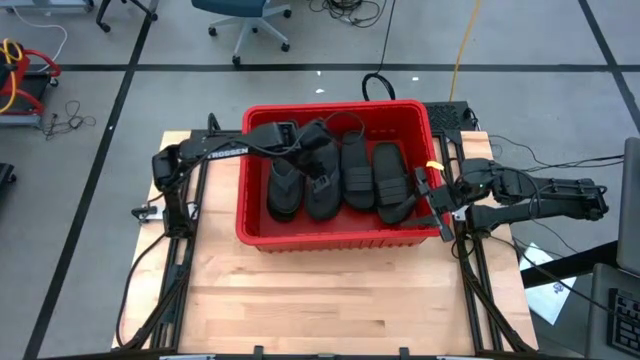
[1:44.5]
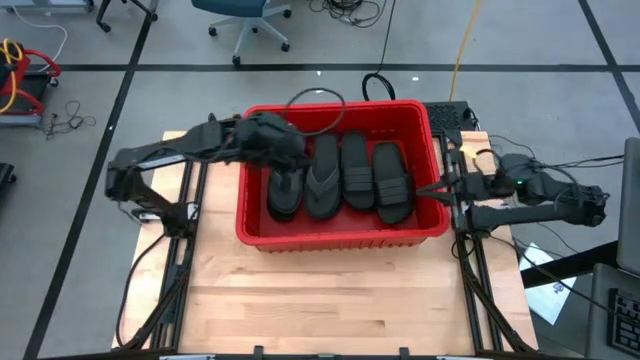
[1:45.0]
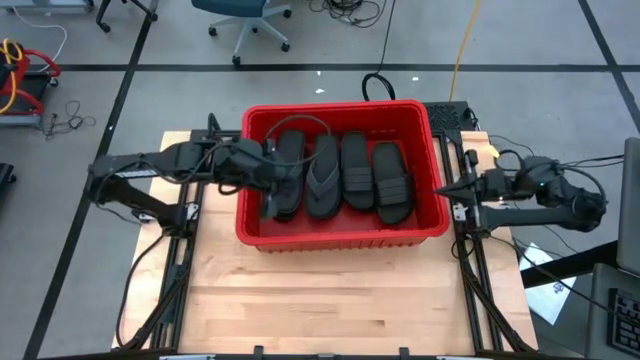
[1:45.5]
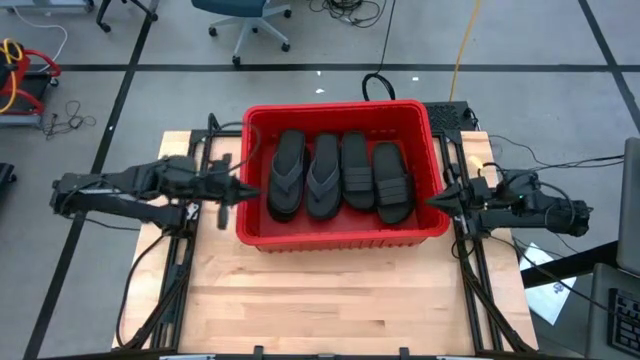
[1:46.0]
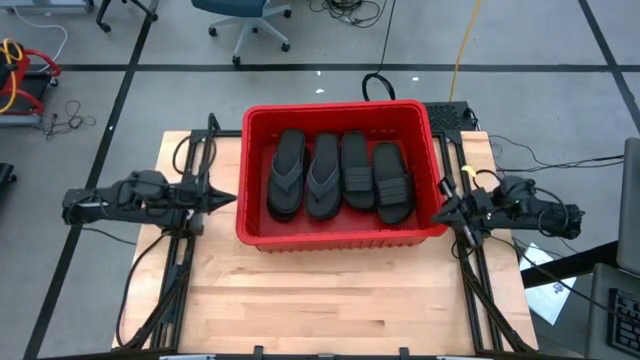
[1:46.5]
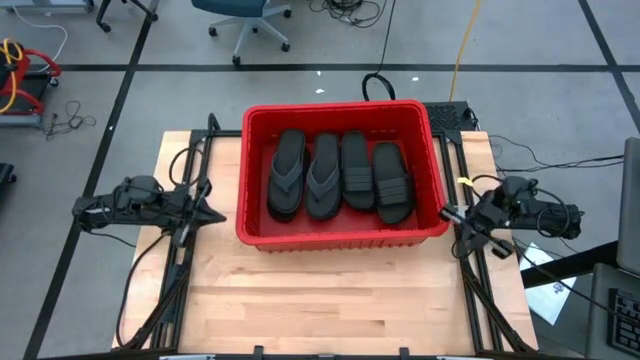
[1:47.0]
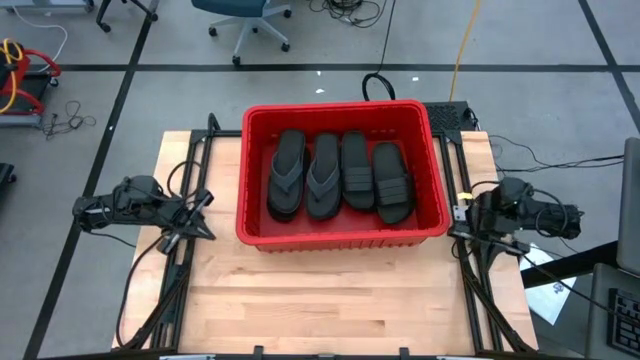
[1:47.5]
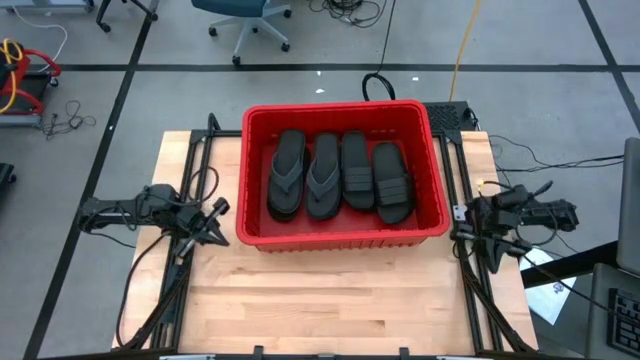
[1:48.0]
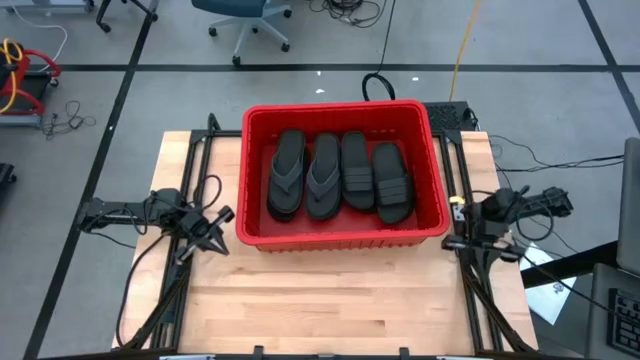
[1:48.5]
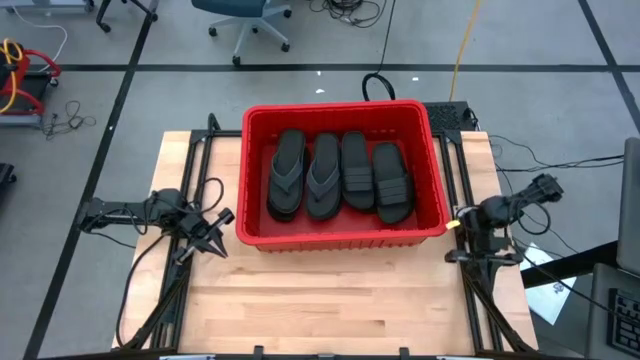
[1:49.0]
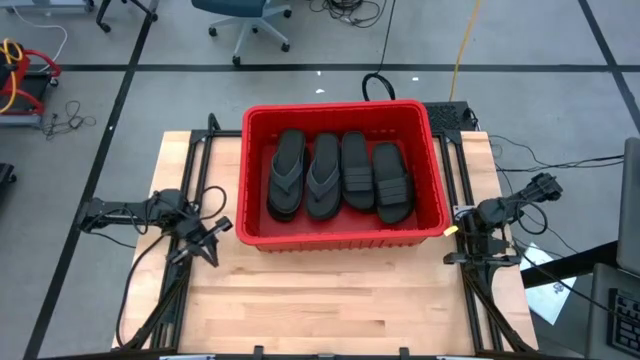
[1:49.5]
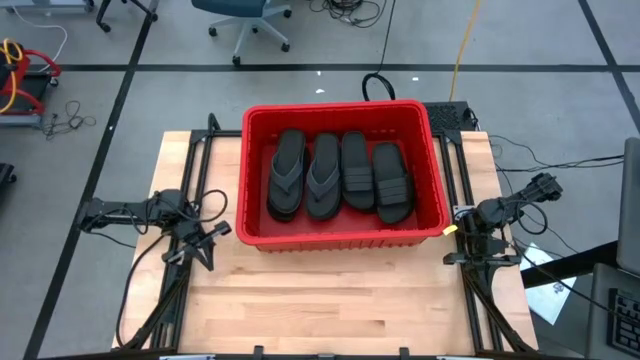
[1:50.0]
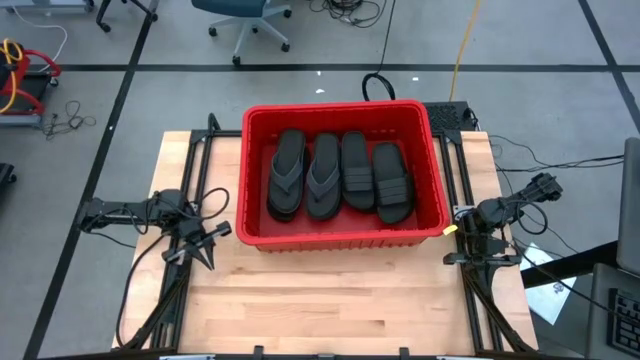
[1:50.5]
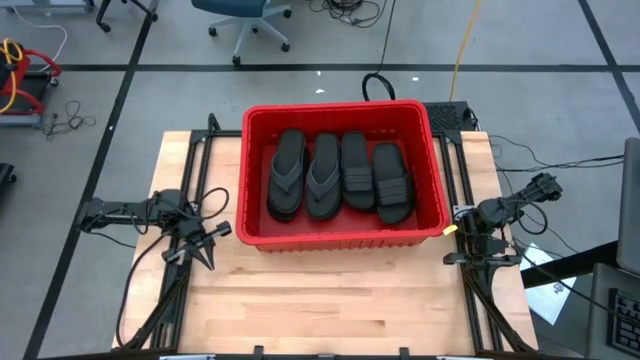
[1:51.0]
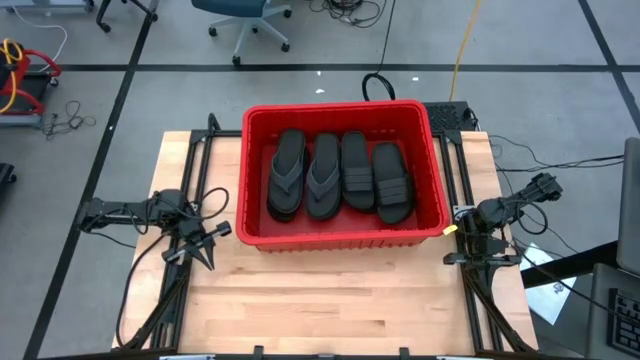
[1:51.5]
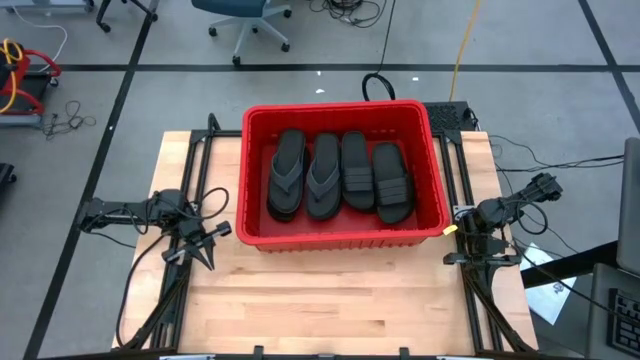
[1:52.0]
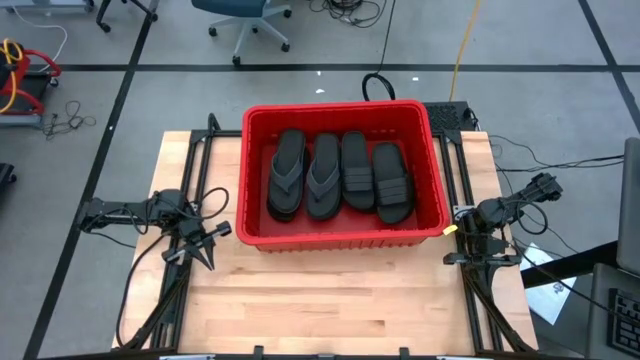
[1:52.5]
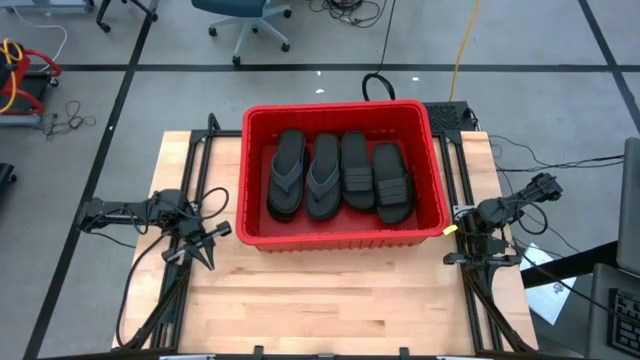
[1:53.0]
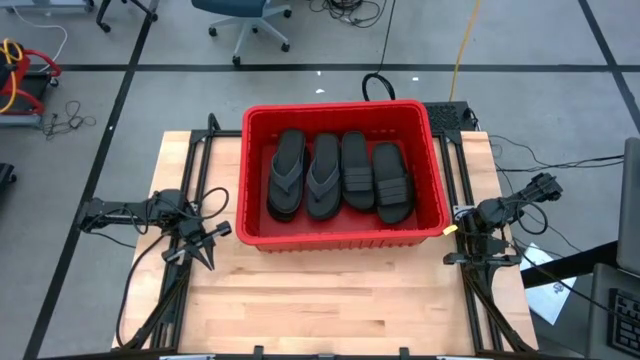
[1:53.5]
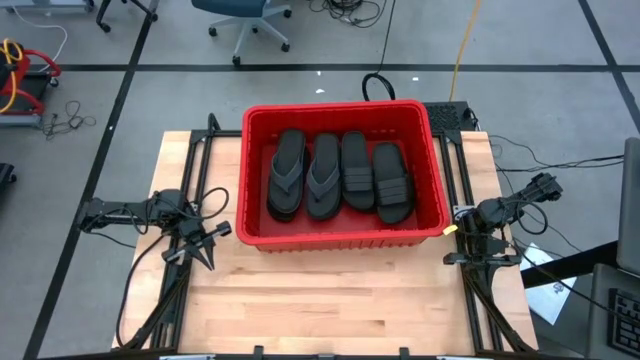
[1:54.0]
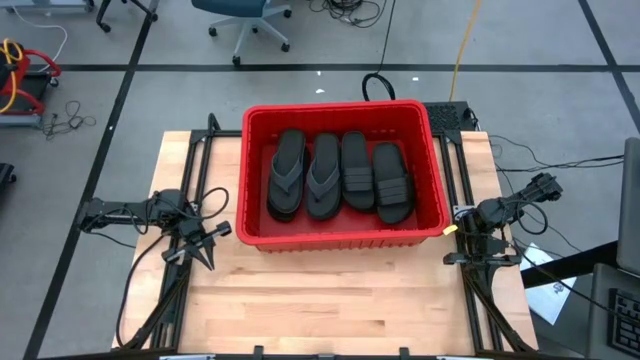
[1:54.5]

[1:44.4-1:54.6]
Task: Pick and place slides into bin
Return to Home Position

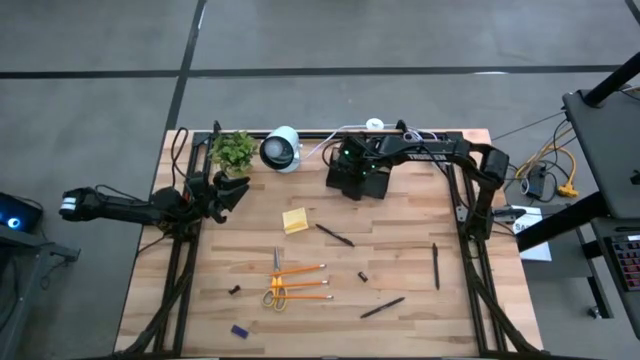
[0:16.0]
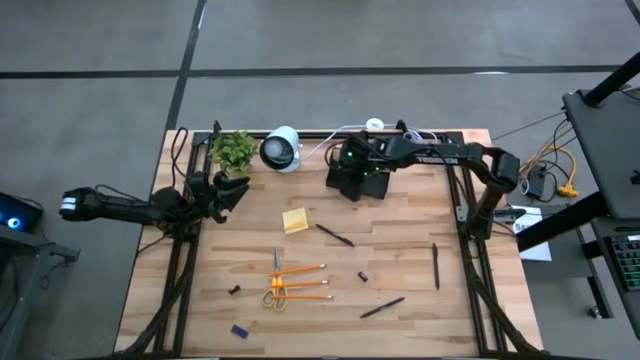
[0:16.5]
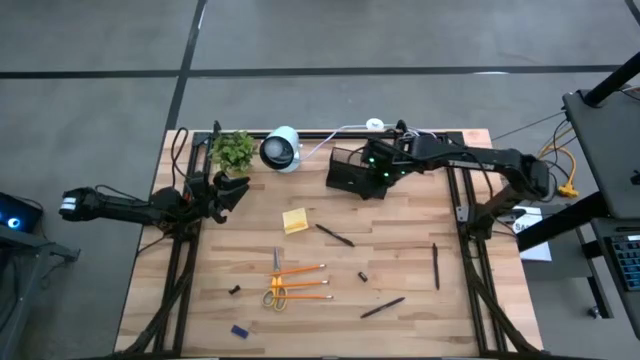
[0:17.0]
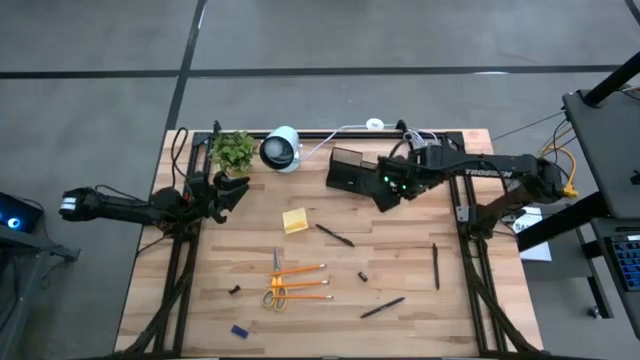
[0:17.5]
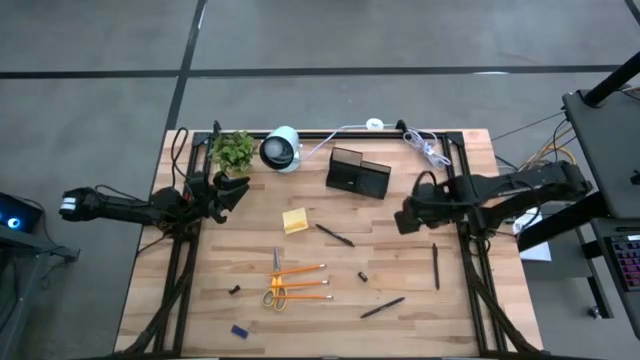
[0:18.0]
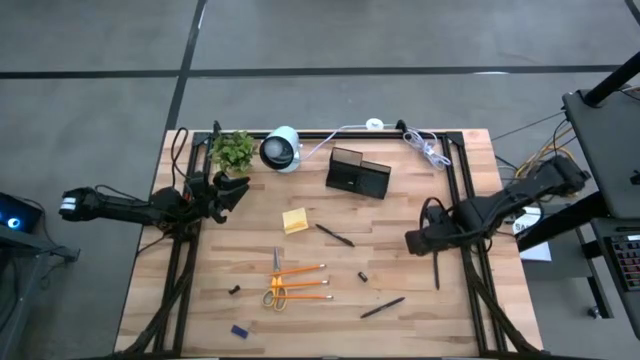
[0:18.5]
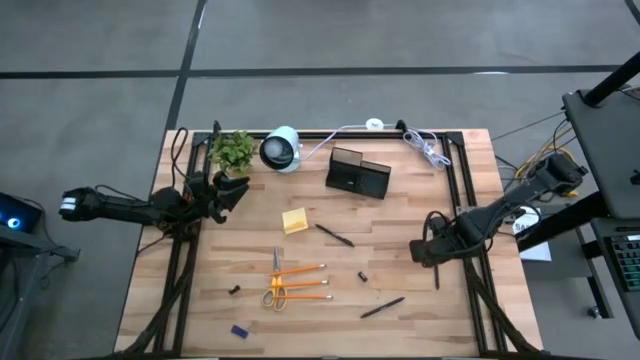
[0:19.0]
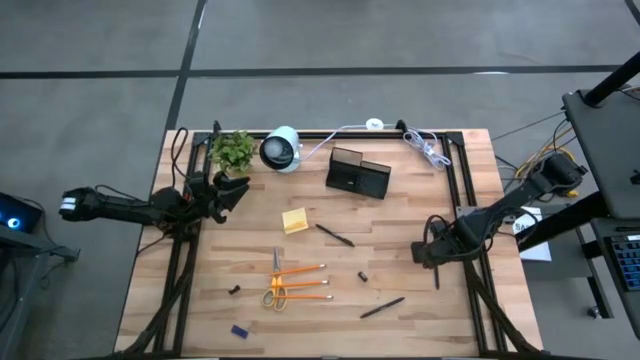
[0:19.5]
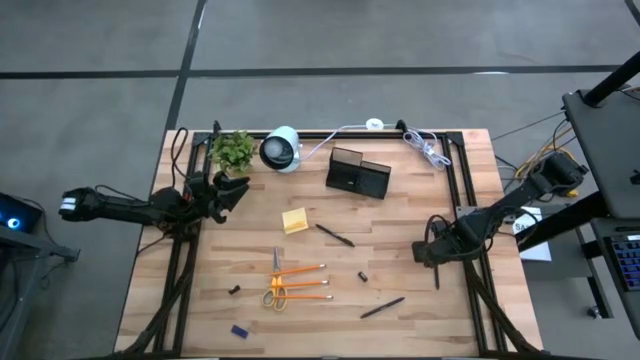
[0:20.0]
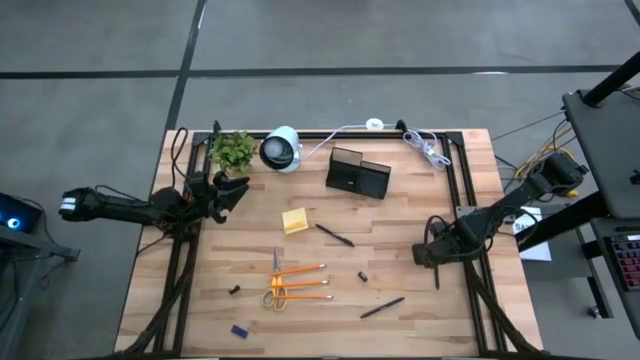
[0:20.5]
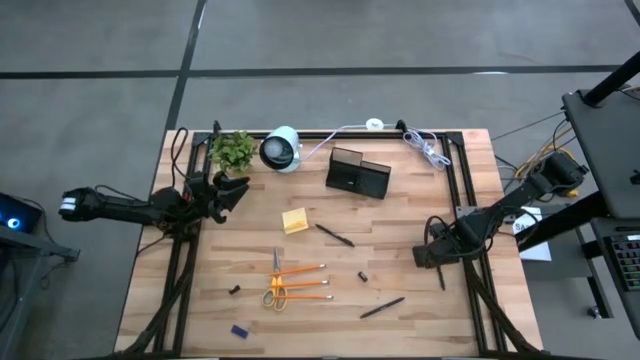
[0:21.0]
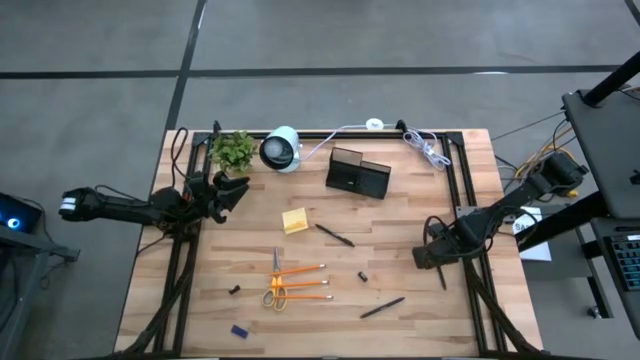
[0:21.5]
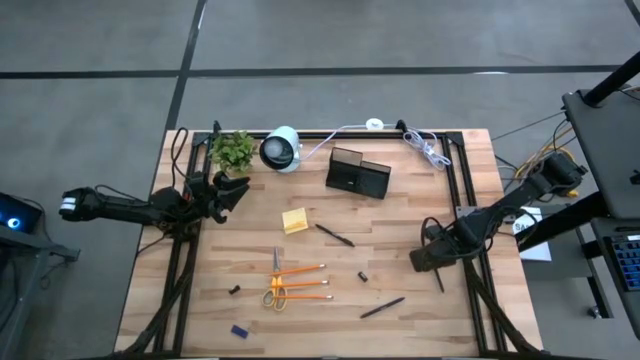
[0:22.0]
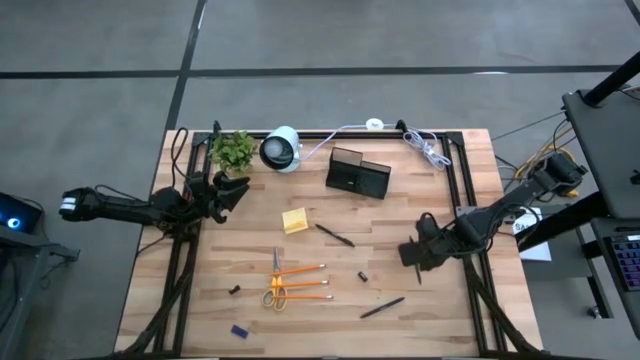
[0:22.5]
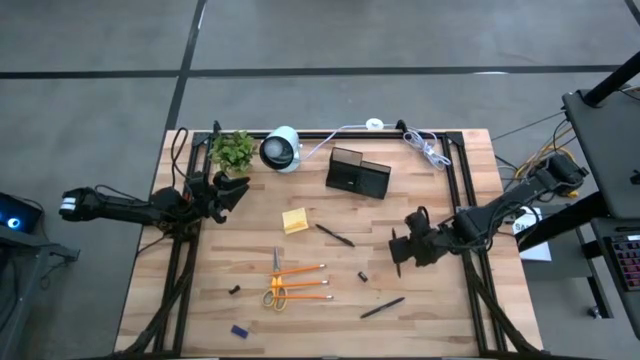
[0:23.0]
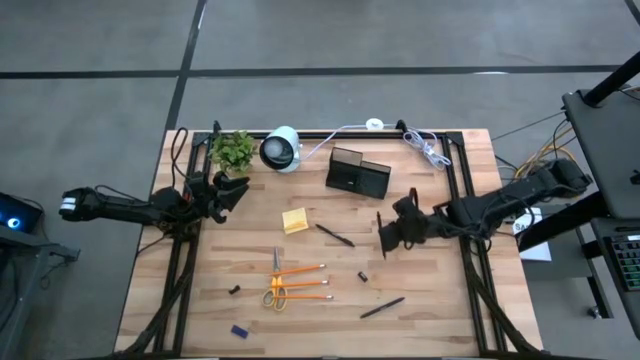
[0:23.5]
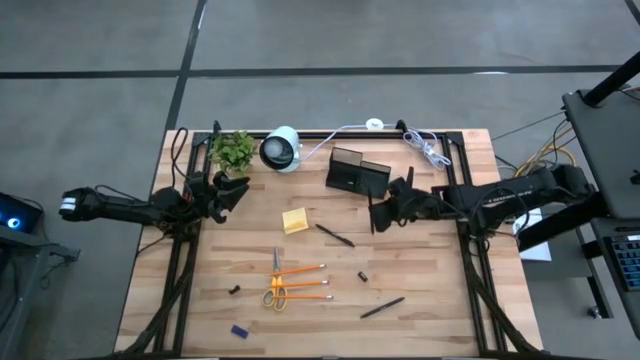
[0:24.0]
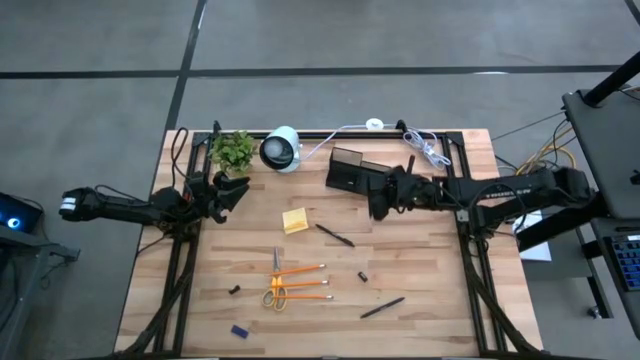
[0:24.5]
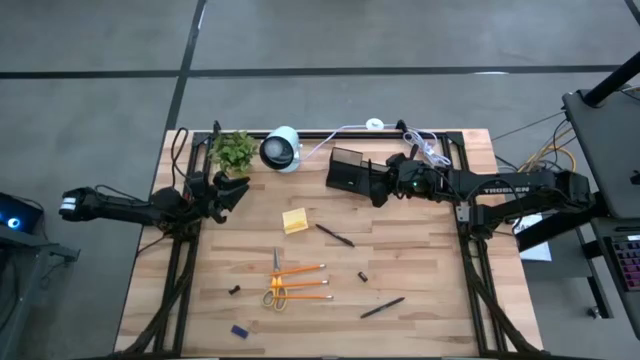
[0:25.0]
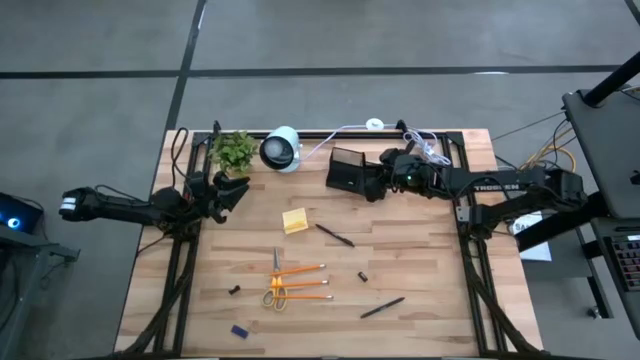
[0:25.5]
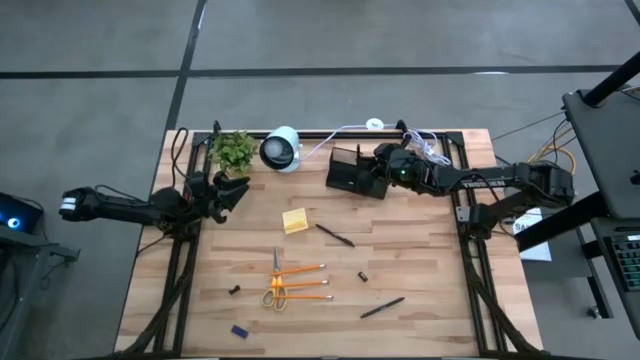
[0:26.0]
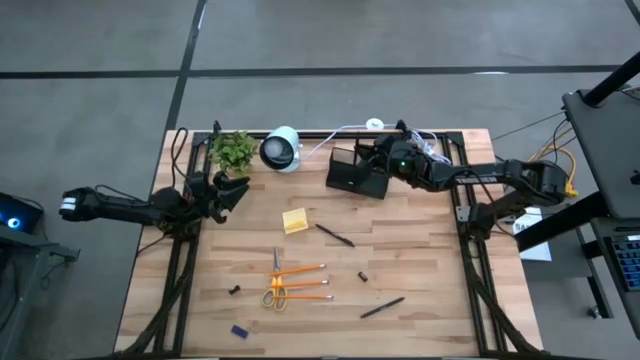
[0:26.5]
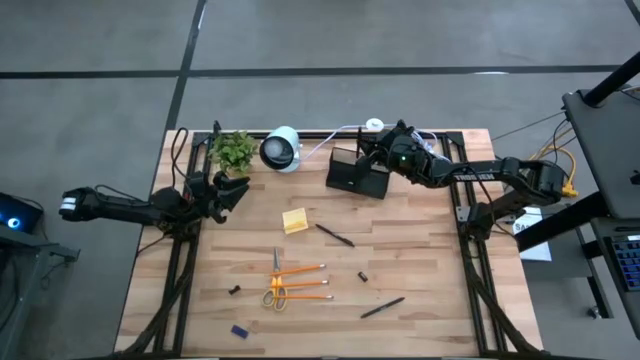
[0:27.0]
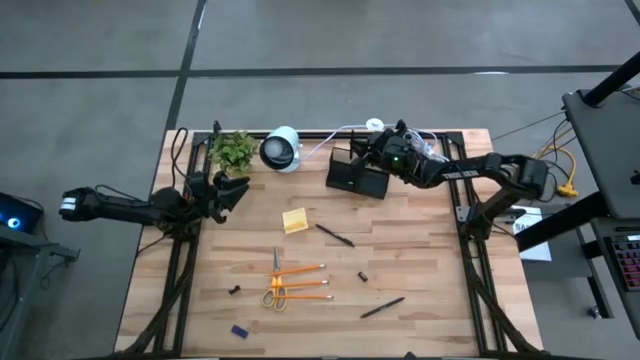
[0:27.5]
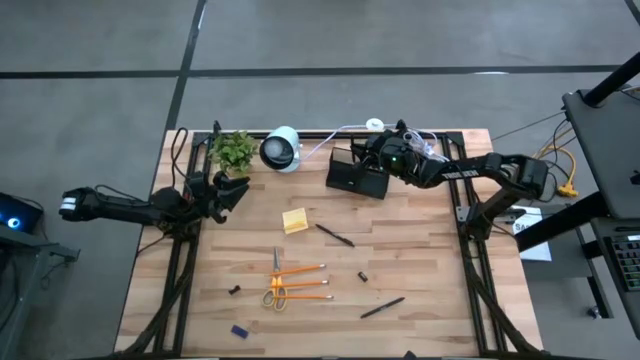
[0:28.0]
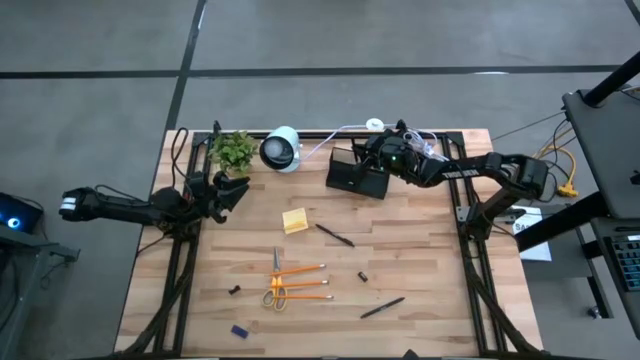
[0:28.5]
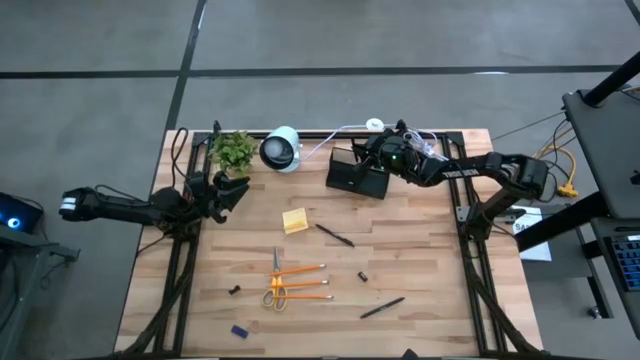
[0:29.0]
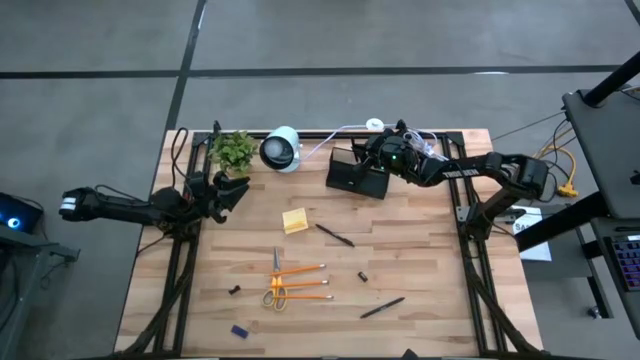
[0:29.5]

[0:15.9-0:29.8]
Task: Pick and place office supplies into organizer
Put the middle right pen into the desk organizer
